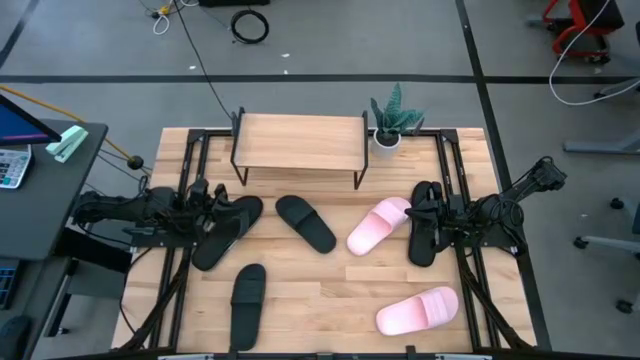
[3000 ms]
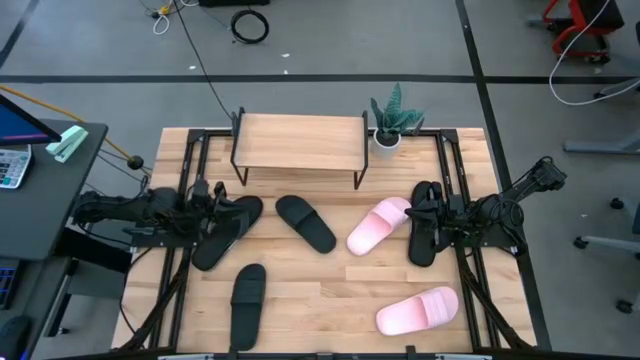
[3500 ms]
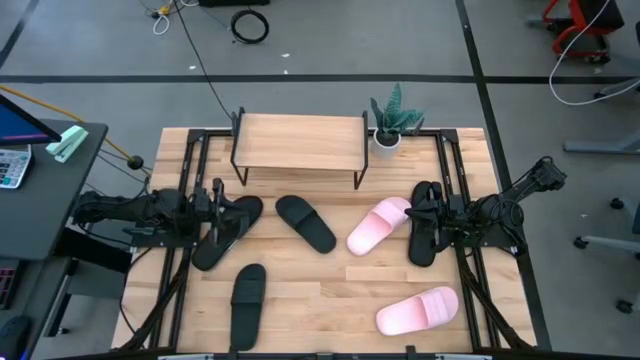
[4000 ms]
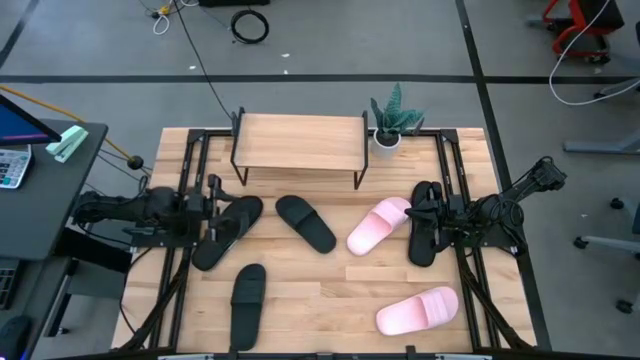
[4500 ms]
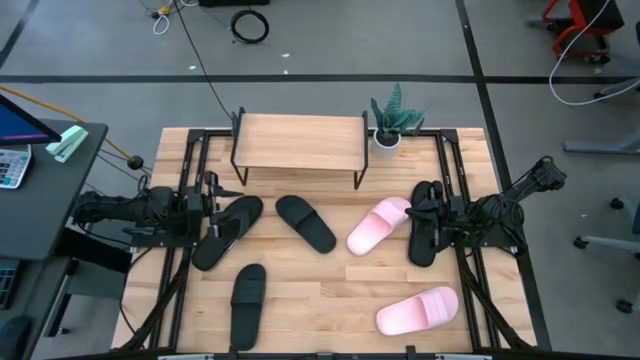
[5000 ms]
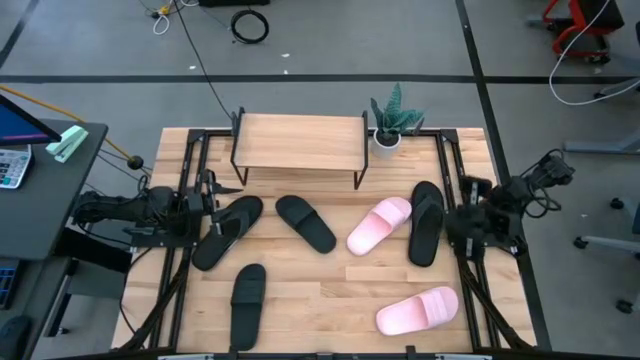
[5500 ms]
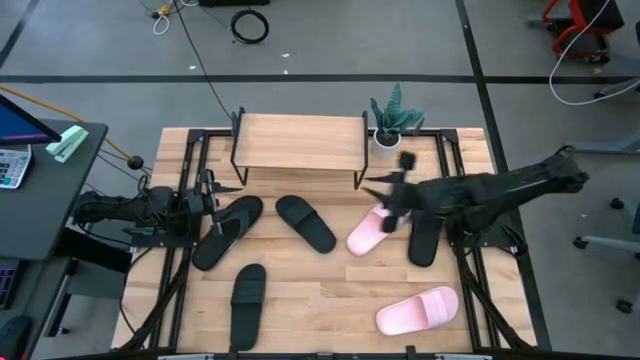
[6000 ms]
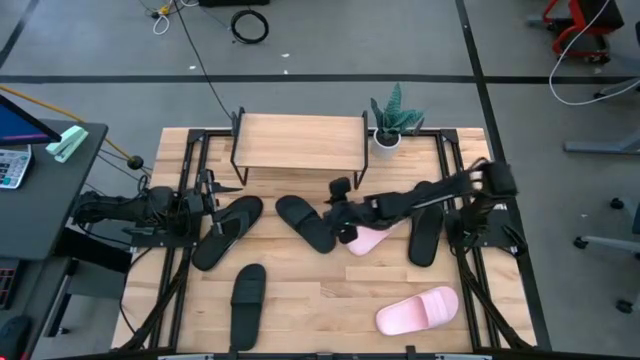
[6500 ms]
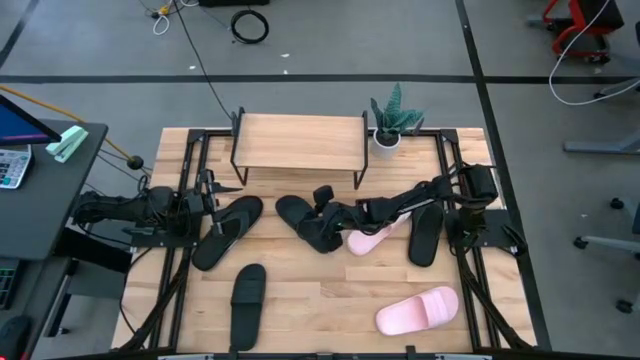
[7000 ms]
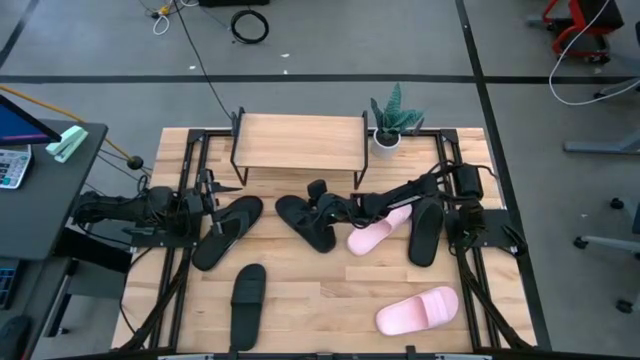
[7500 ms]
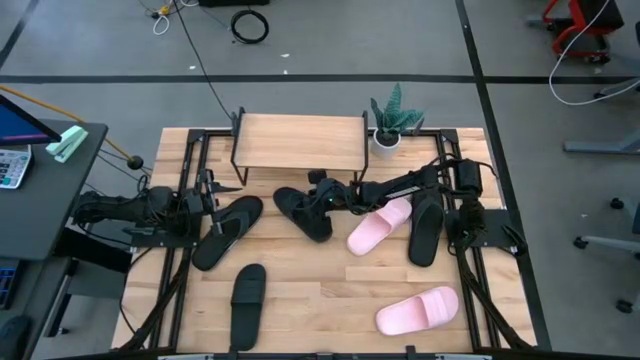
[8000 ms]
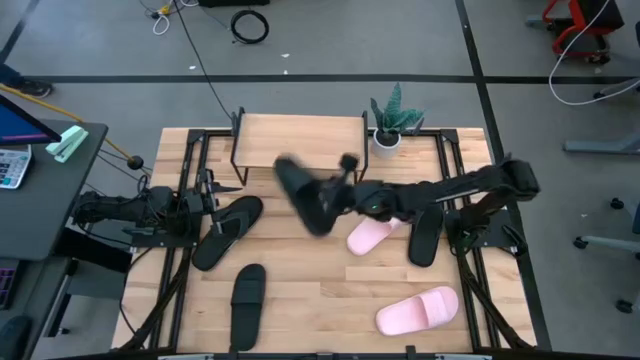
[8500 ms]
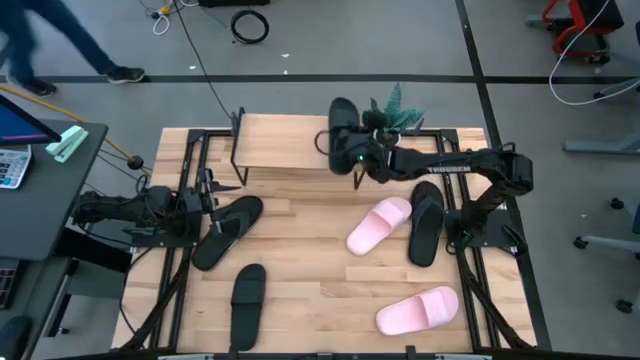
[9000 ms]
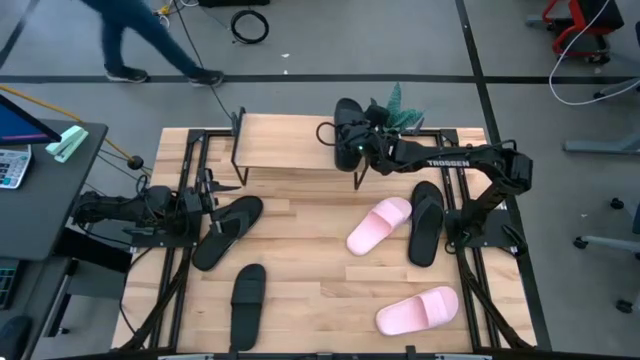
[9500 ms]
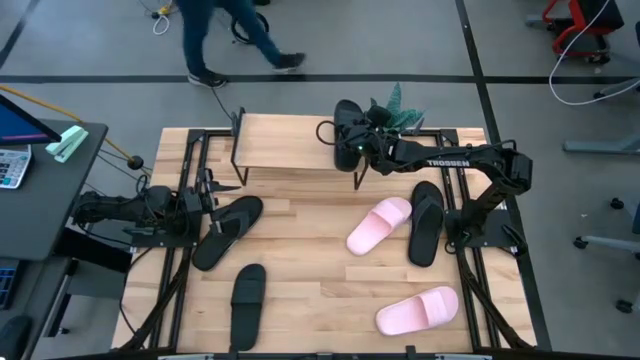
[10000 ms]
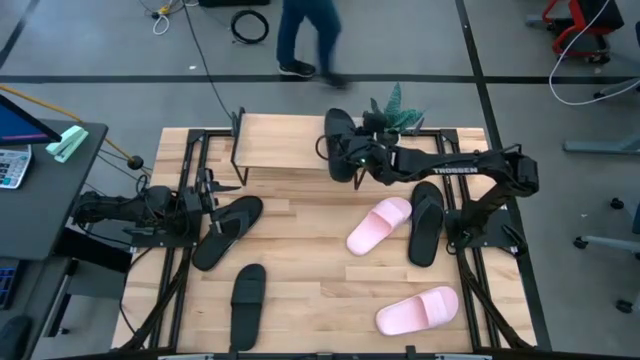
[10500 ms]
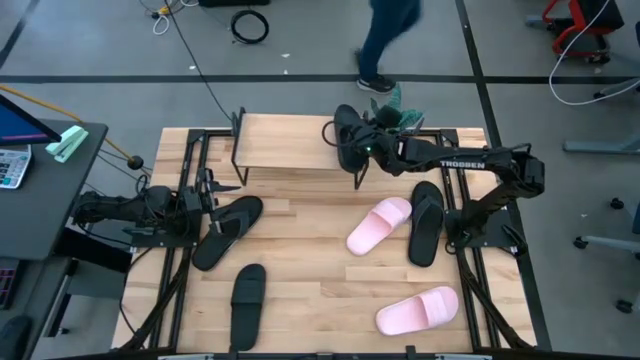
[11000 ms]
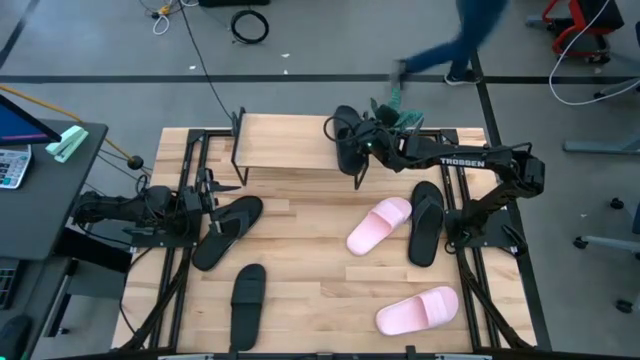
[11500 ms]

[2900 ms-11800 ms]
Task: Pick and place slides into the shelf
Put the top black slide on the shelf

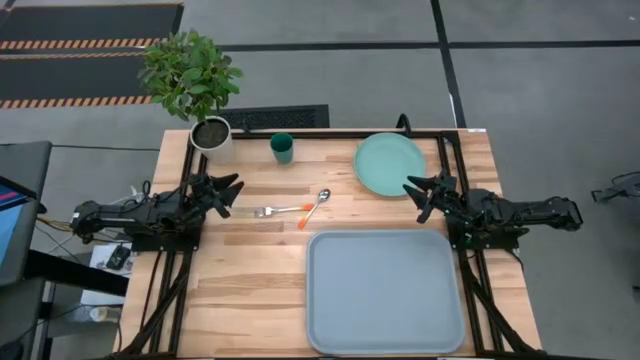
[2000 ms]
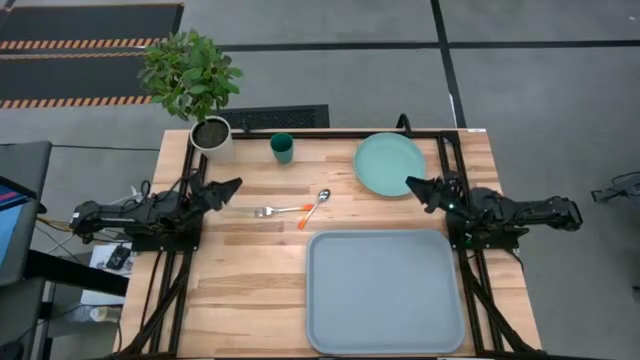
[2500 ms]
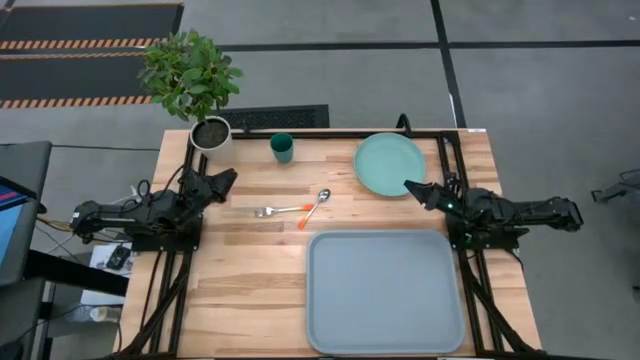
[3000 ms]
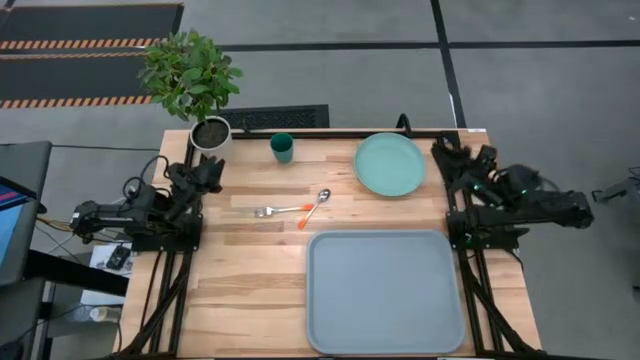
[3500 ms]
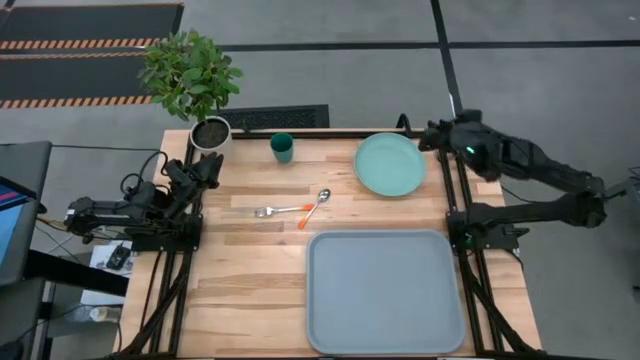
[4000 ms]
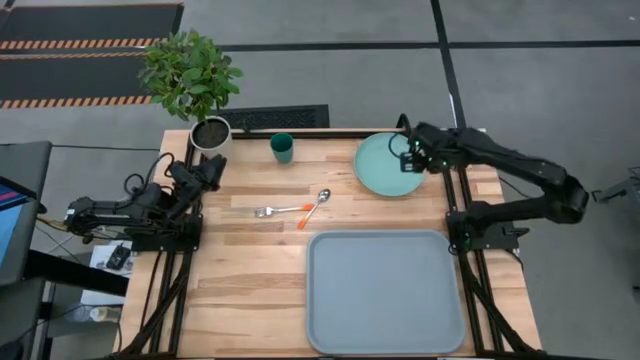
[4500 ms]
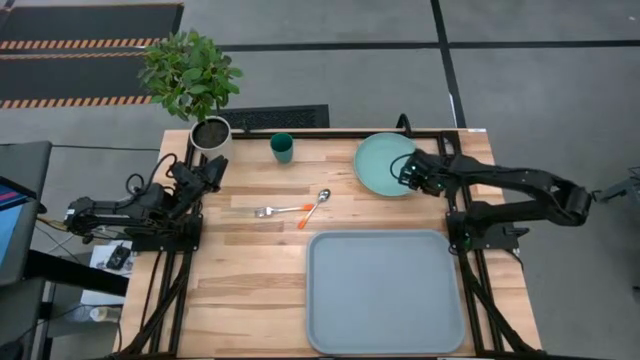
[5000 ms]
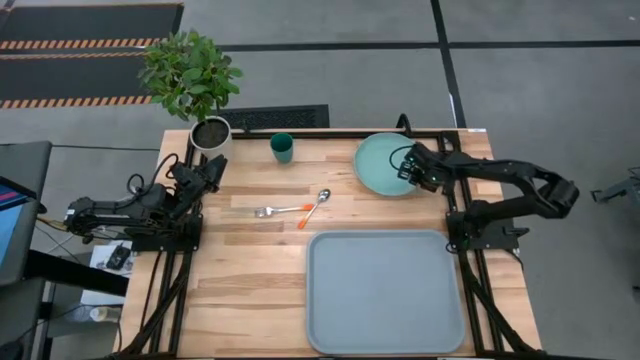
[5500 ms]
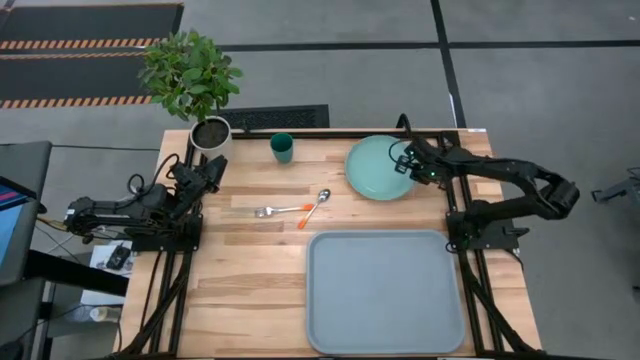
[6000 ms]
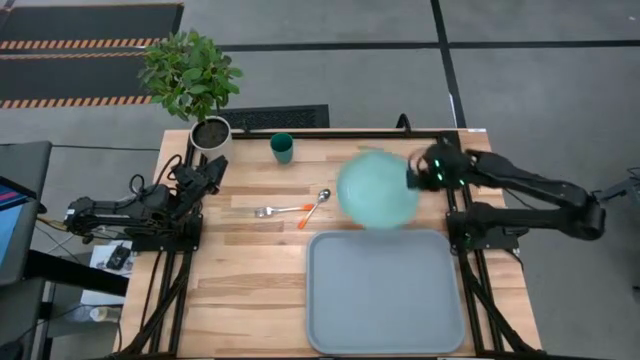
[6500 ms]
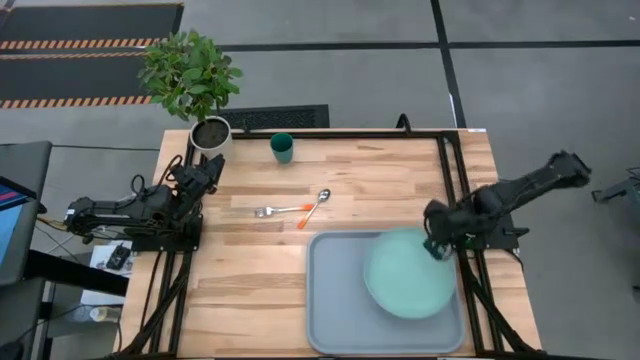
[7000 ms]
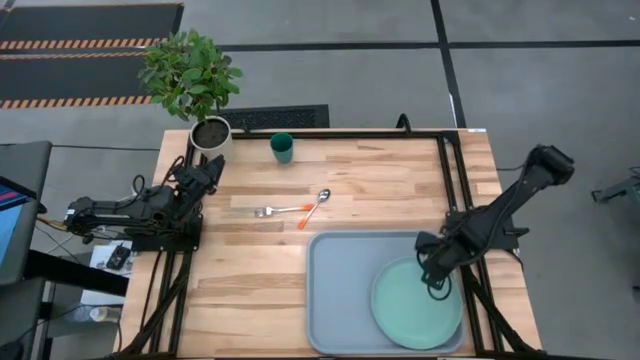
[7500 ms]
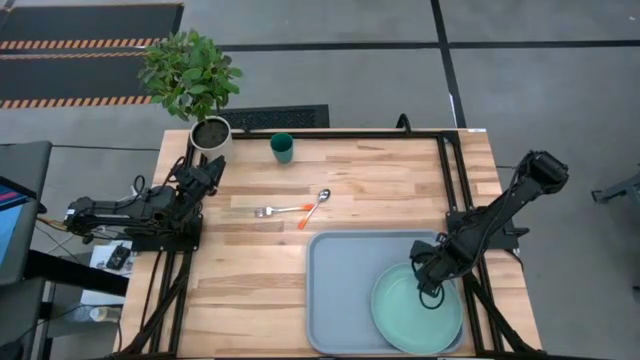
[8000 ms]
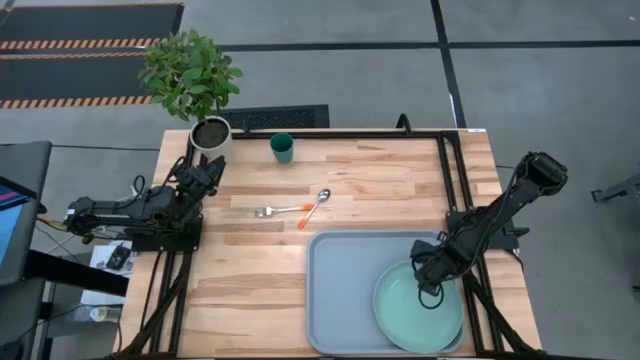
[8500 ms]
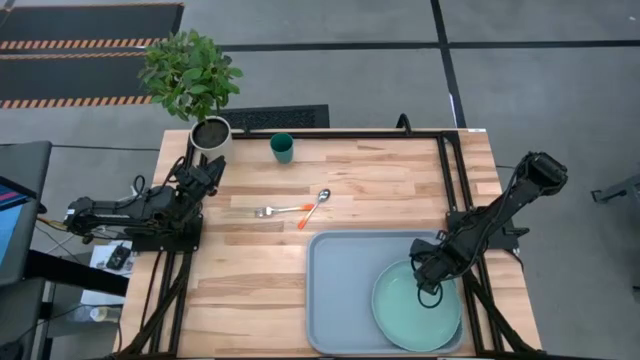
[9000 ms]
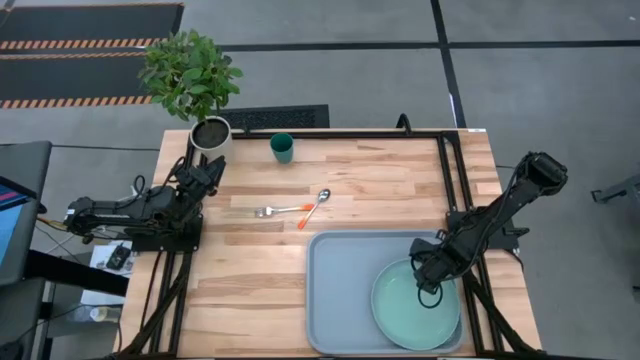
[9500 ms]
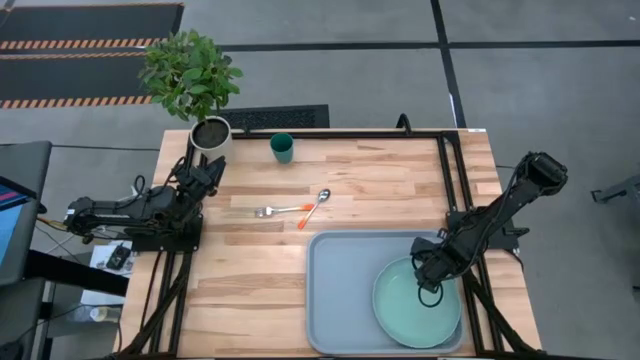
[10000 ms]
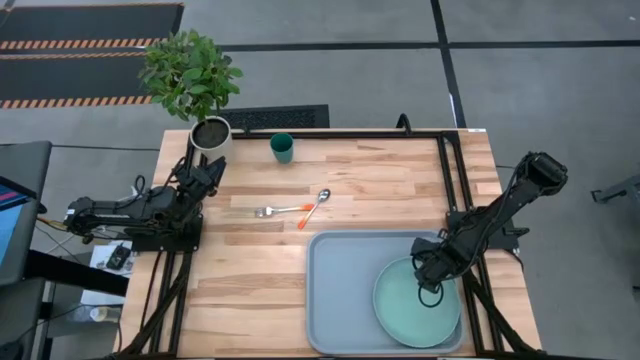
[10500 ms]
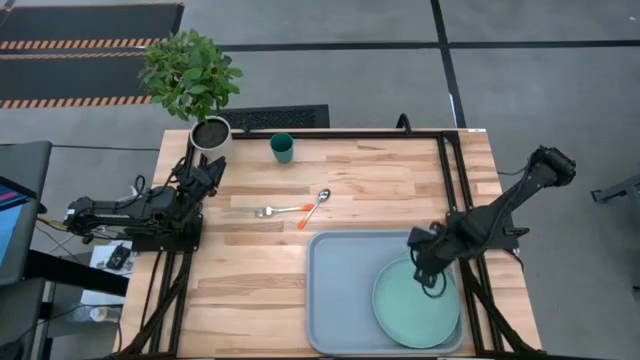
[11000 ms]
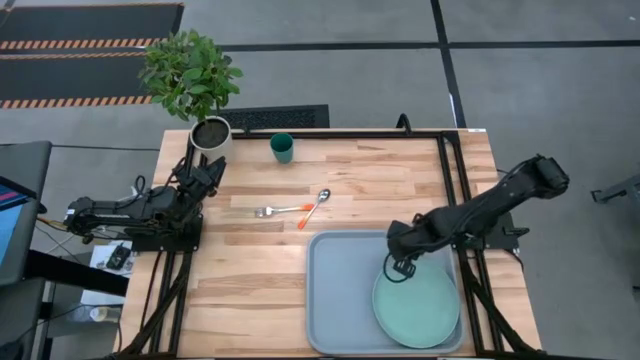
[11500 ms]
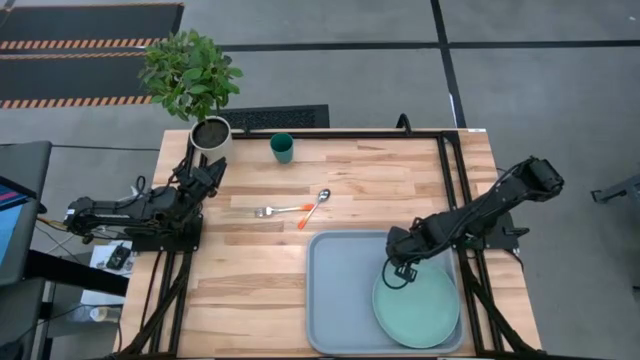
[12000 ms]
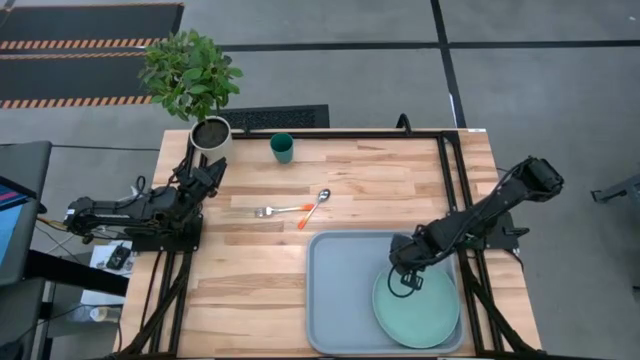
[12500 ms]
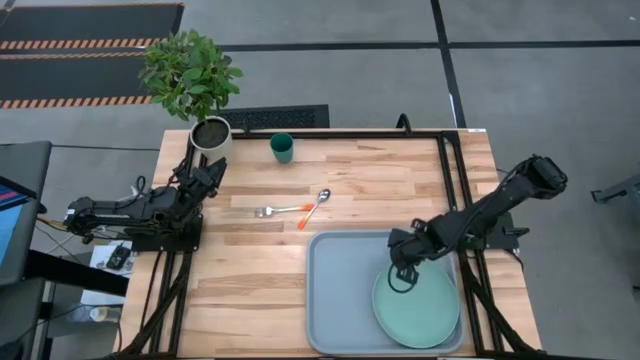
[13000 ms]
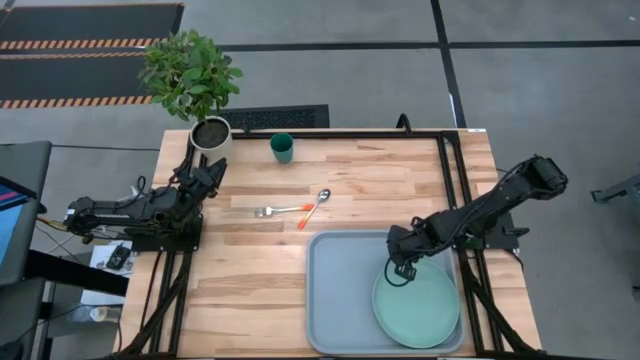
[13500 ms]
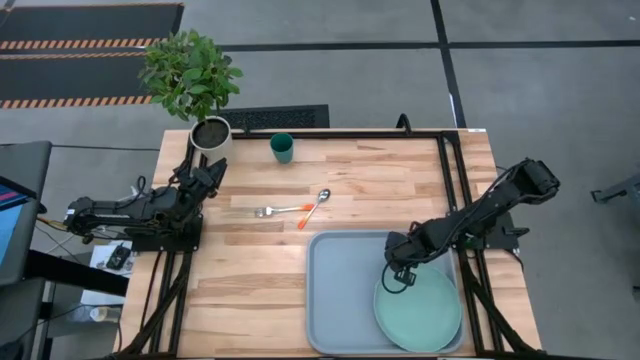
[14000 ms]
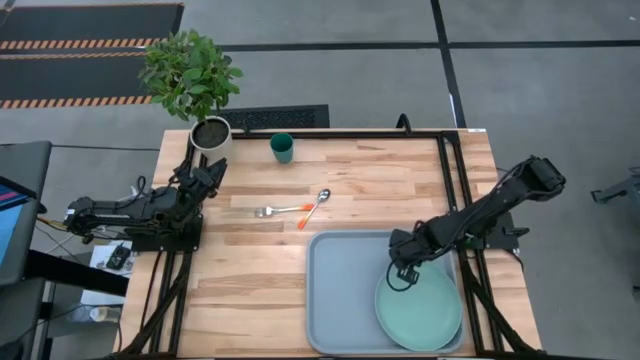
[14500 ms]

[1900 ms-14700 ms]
Task: Pick and place plate/cup/fork/spoon on tray
Put the light blue plate on the blue serving tray
